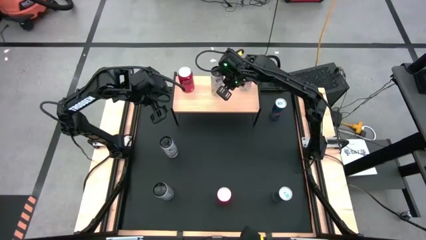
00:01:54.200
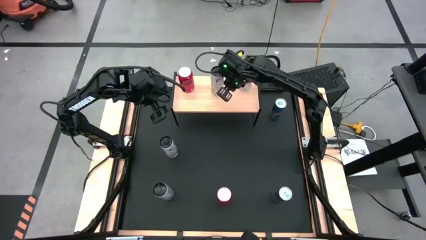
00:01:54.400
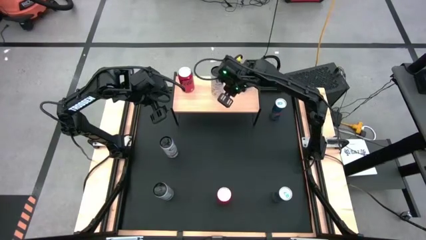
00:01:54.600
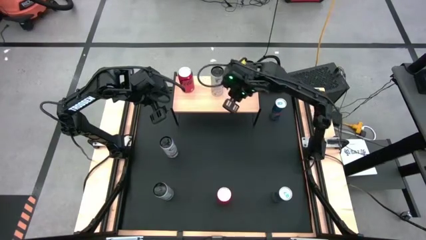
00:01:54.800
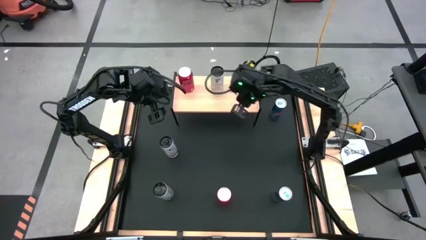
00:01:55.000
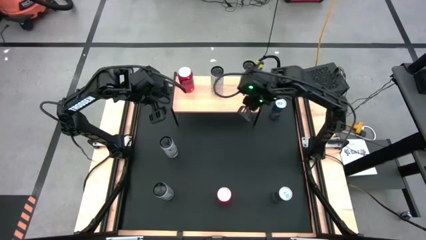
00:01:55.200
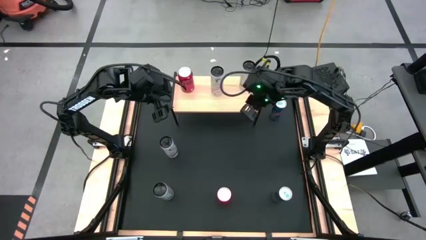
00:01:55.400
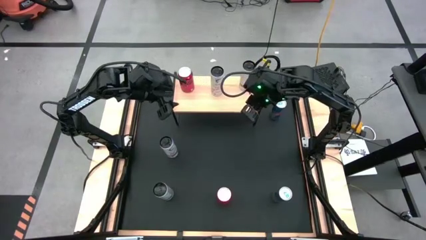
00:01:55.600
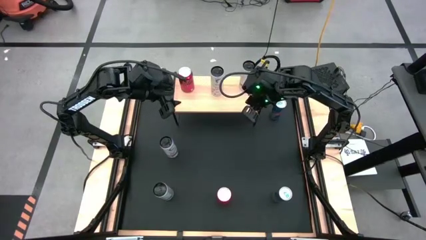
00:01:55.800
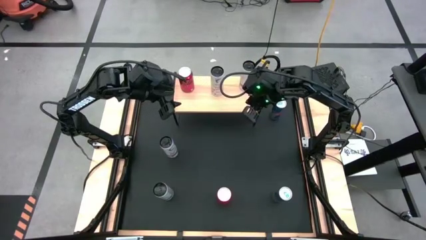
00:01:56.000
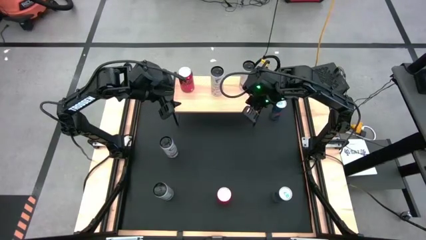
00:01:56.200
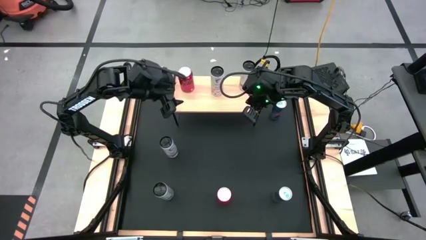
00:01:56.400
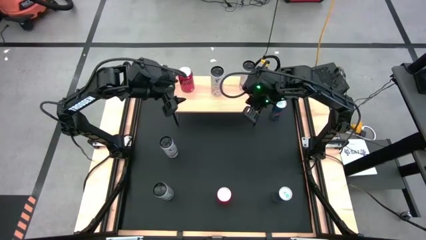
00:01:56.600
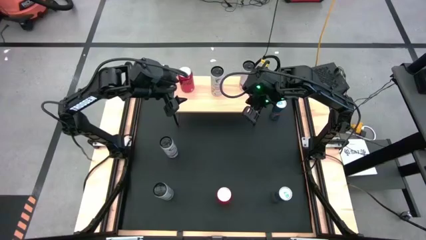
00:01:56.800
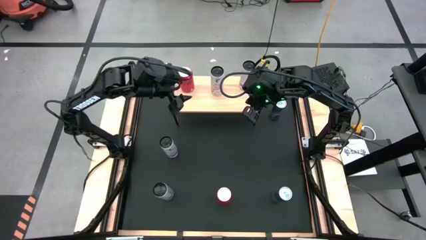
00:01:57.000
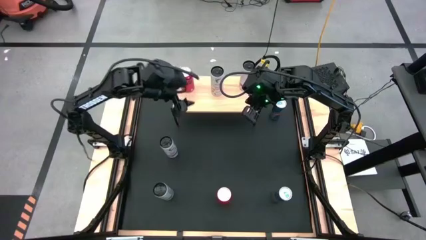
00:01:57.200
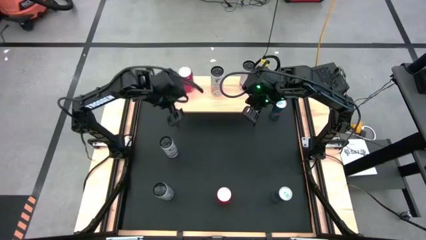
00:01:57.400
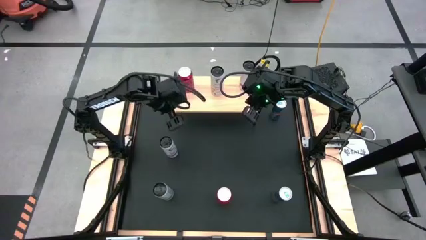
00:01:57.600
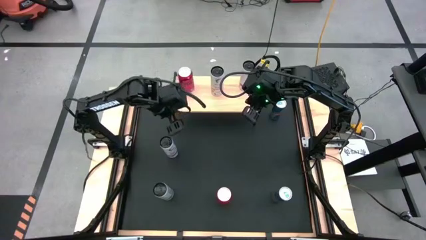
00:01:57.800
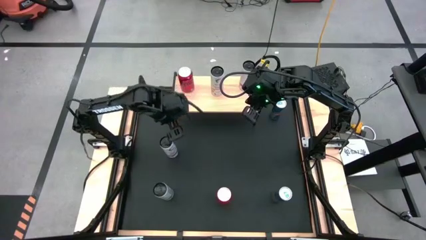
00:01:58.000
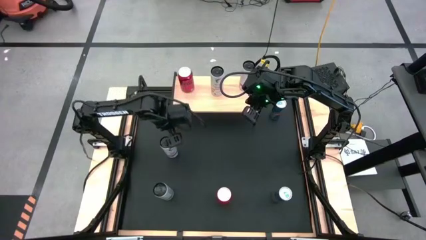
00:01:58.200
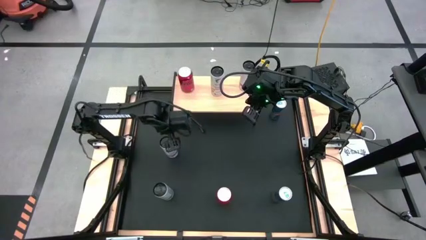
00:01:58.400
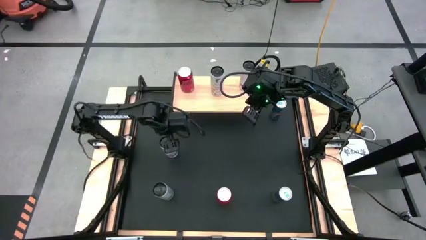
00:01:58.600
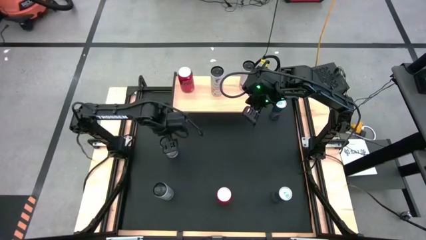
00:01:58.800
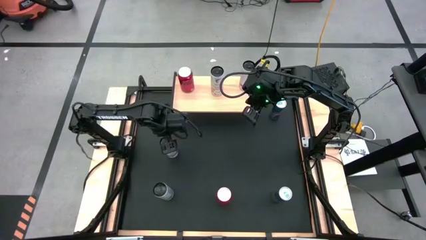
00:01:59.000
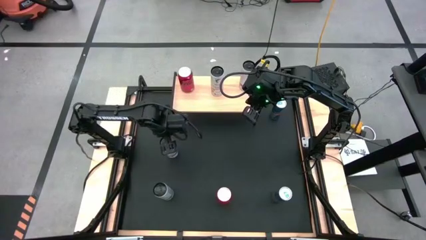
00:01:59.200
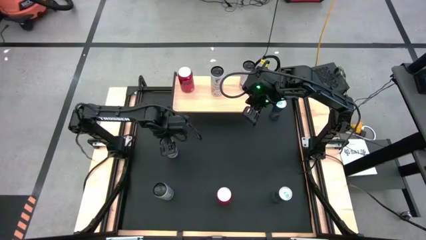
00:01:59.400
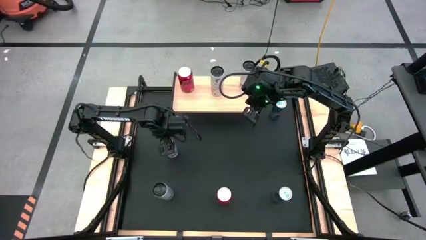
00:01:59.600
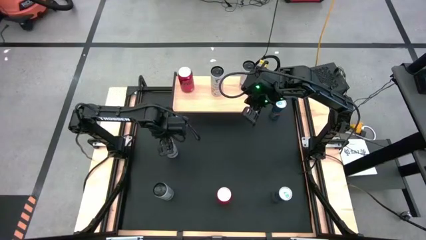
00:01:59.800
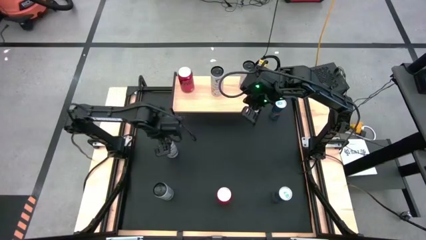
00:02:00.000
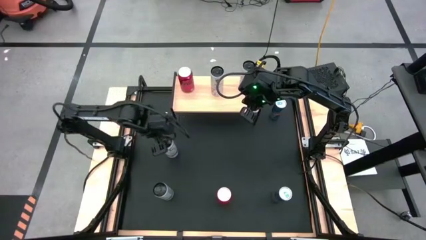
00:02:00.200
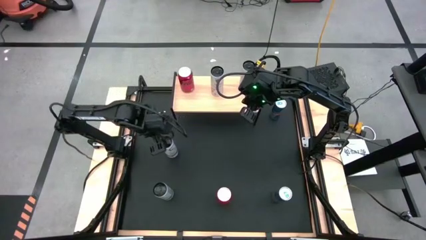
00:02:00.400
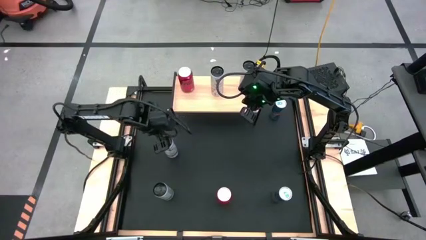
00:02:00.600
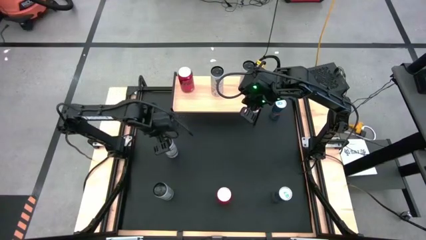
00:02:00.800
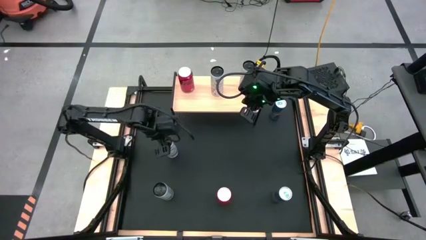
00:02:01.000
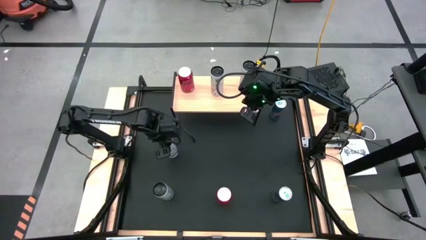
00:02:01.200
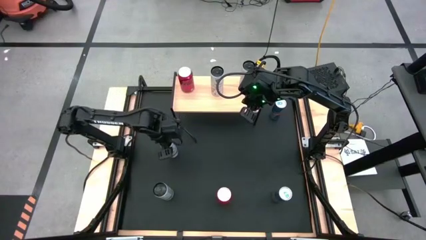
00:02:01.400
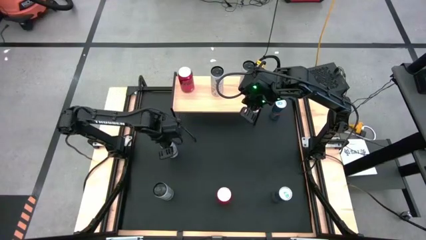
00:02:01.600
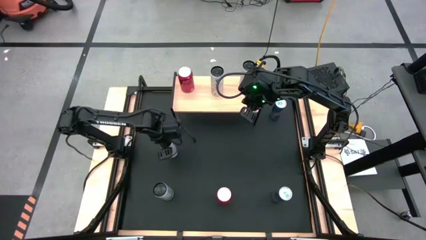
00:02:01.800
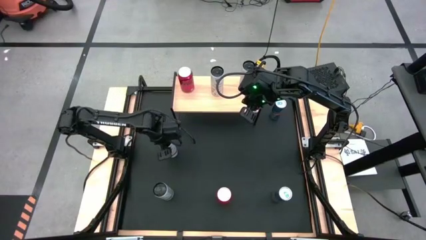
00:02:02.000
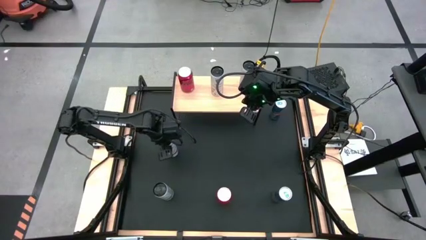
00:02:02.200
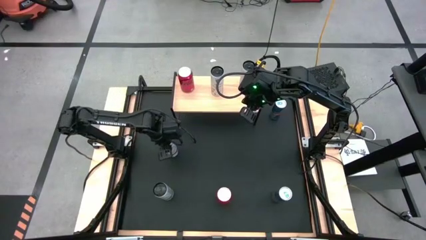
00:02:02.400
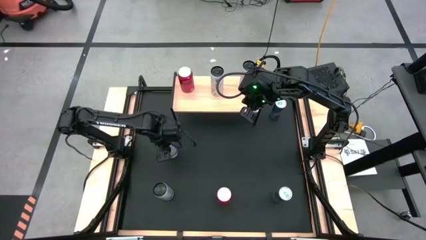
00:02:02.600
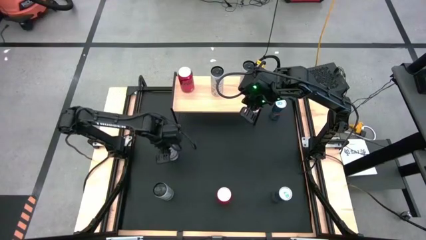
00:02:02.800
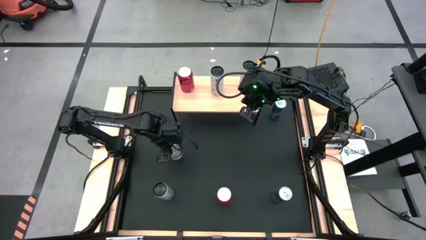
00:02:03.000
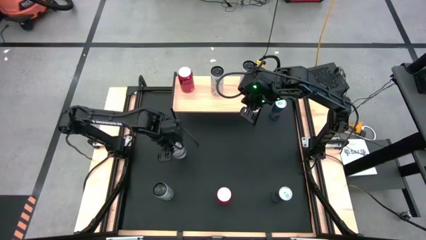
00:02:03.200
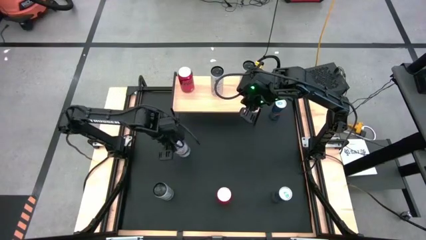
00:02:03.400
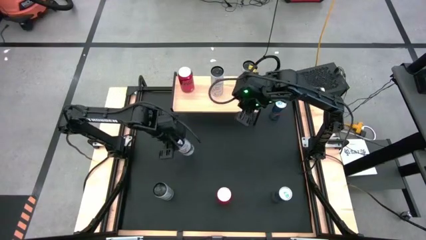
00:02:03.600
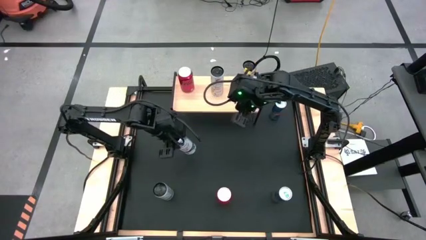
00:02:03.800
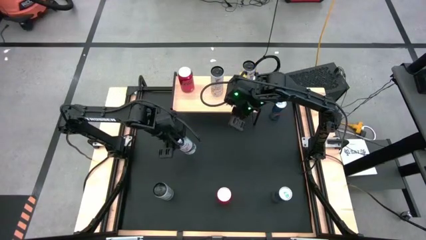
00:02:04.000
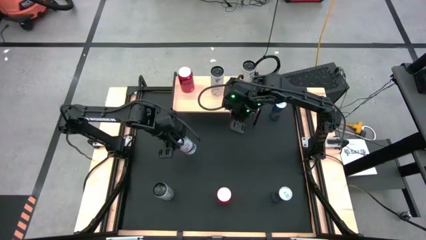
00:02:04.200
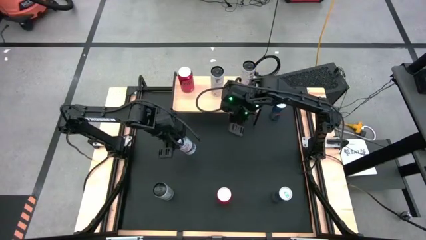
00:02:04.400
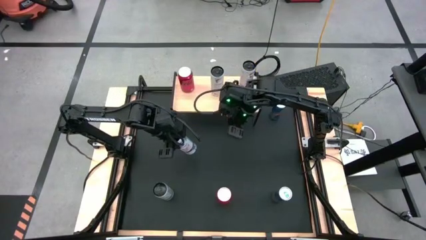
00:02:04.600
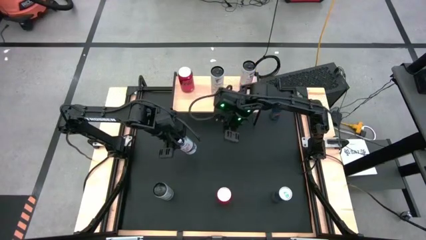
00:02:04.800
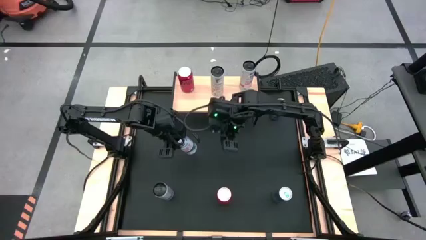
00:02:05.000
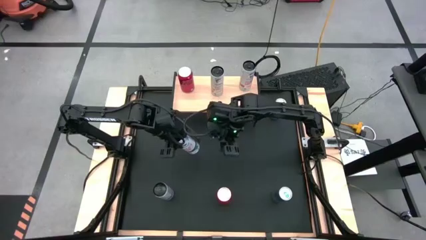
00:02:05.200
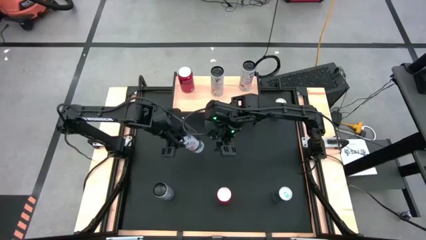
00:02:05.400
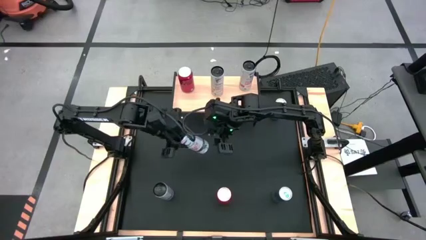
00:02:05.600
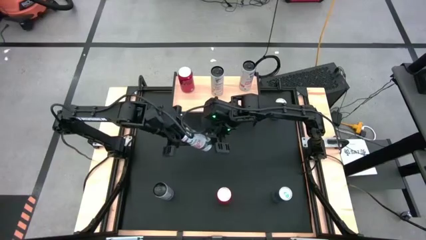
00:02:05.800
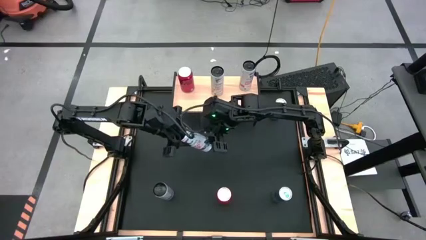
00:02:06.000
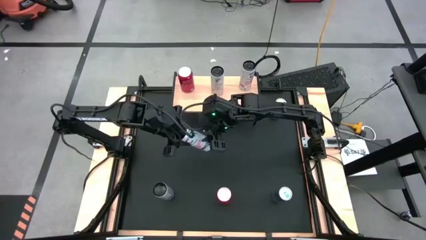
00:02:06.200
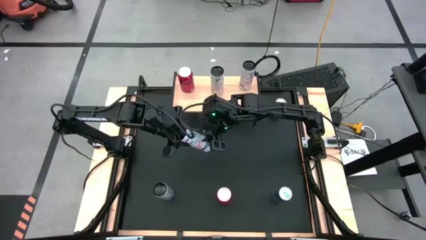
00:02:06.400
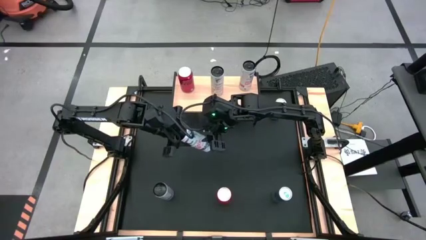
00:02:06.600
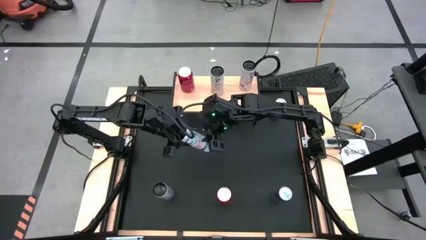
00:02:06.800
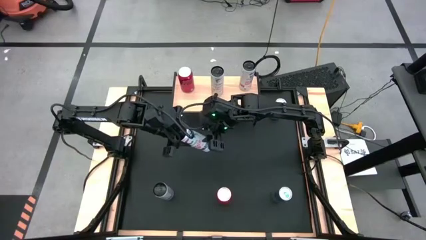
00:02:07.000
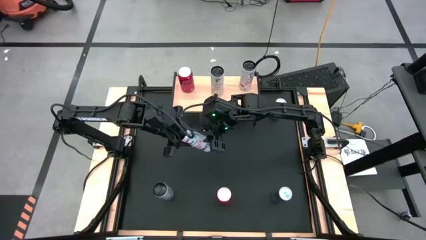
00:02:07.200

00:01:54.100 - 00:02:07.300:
Task: Place canned beverage on shelf
Put the white pink soda can on the shelf aligned with the other white pink soda can

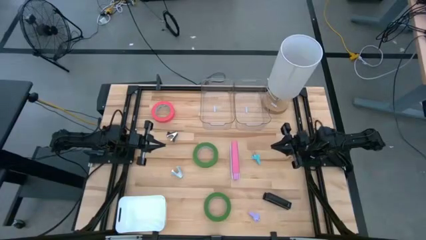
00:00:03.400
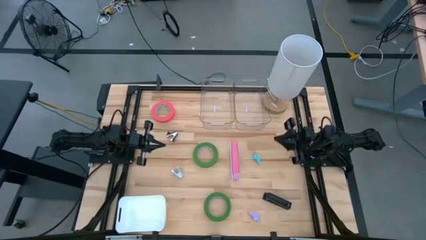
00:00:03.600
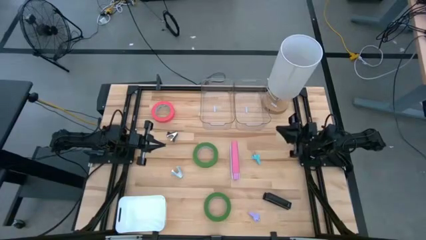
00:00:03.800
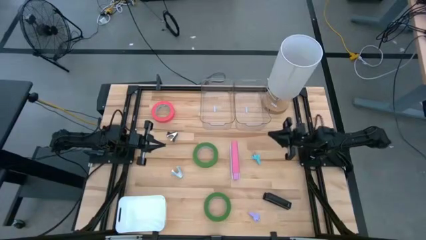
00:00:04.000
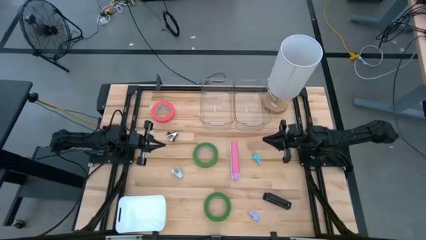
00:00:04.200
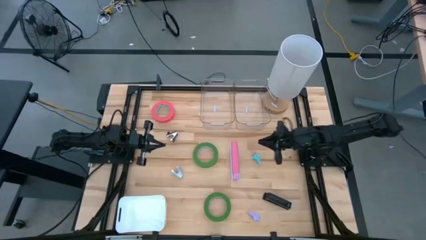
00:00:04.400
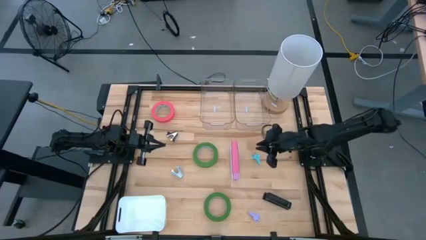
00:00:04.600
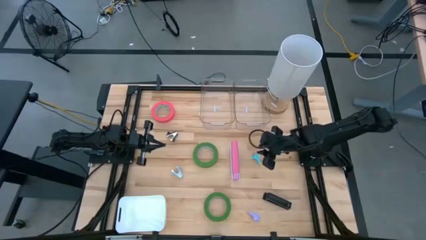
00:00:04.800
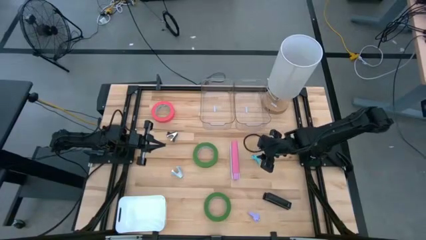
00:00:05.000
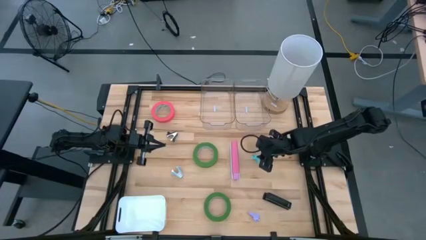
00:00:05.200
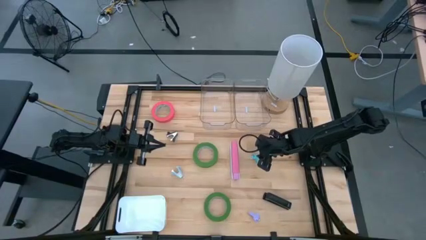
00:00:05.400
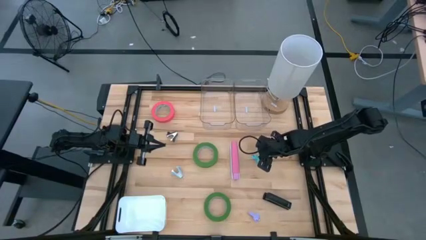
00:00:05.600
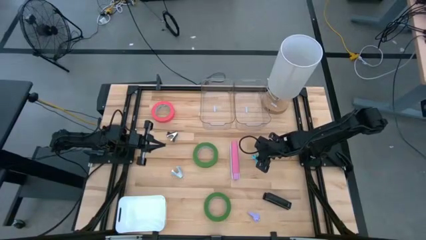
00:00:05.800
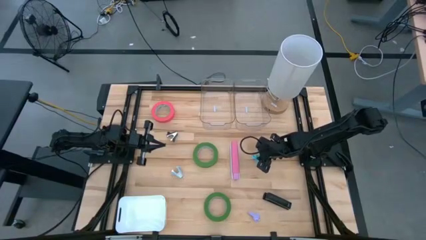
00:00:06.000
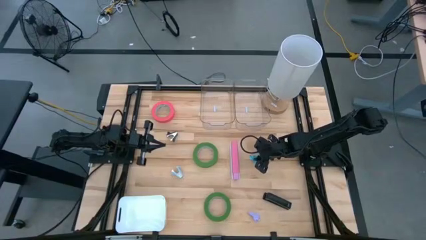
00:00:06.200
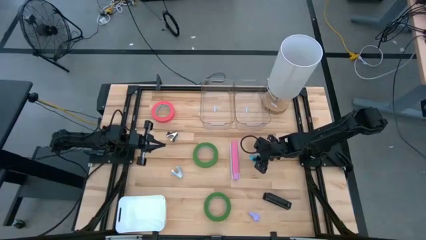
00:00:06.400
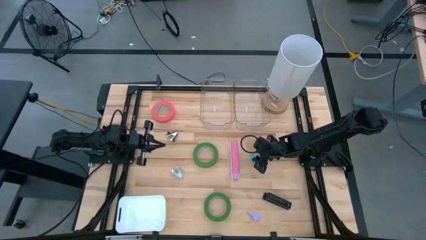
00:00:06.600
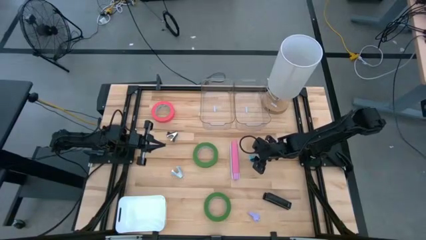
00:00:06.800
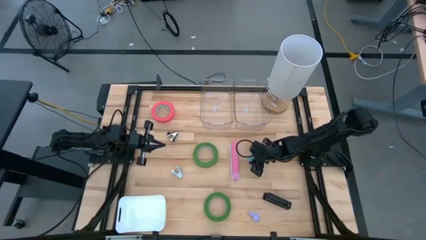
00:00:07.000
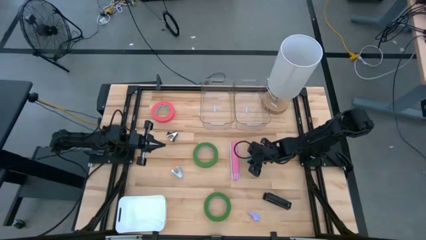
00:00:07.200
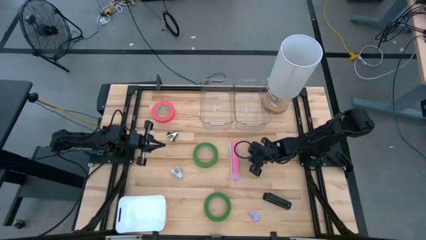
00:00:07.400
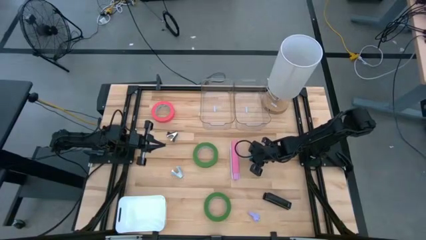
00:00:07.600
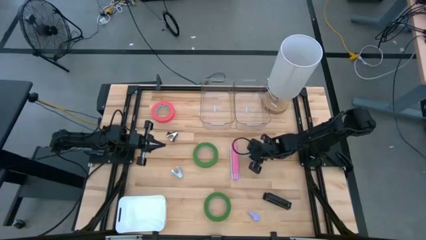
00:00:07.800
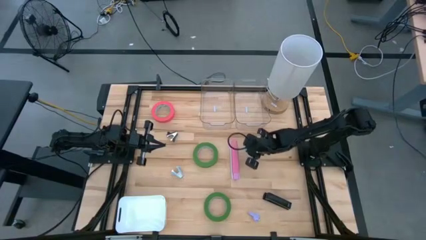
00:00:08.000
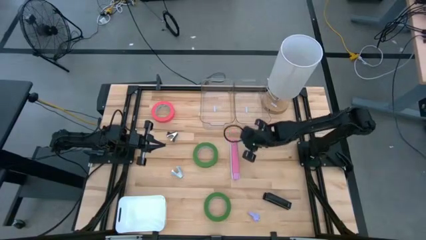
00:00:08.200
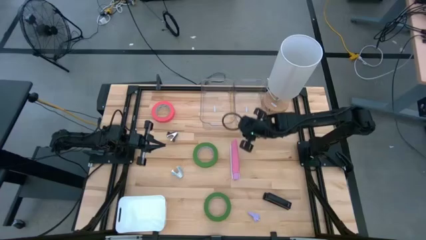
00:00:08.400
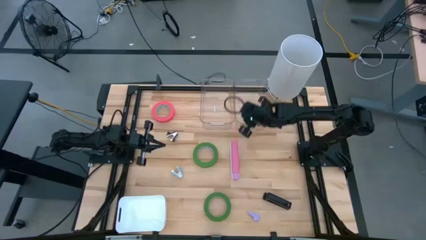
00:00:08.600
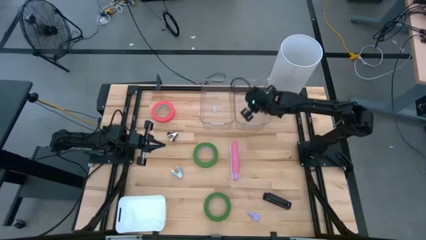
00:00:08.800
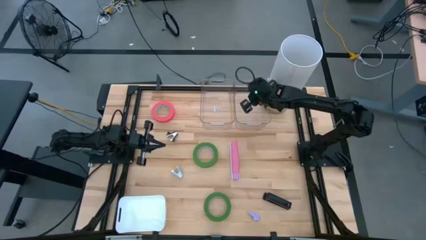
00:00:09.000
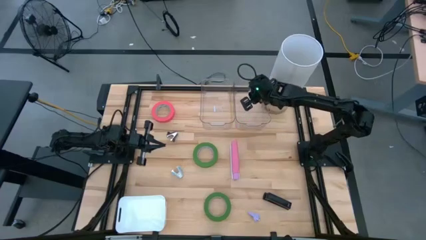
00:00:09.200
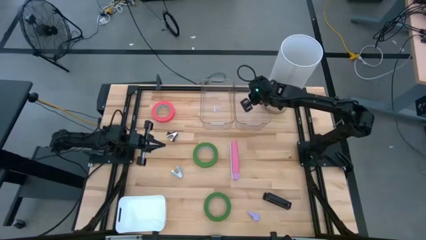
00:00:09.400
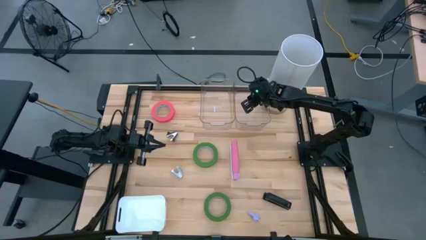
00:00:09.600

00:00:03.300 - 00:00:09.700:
Task: Pick and place Stapler, Stapler remover, tape
Put the right blue staple remover into the right transparent bin
